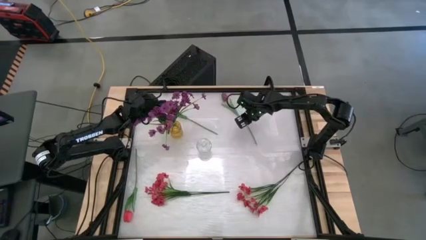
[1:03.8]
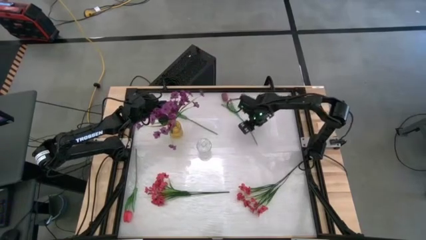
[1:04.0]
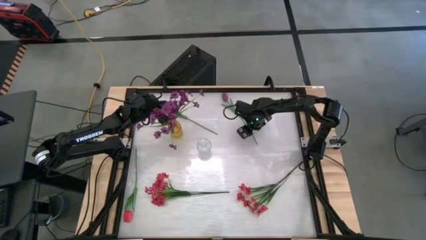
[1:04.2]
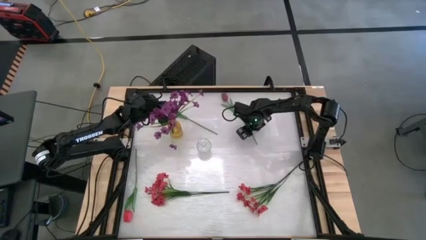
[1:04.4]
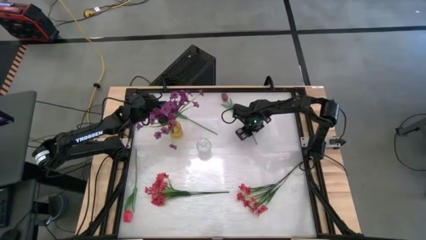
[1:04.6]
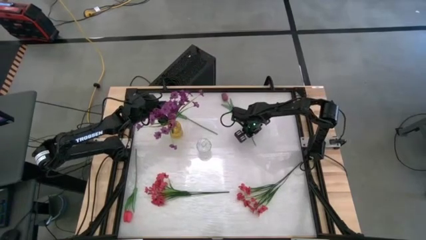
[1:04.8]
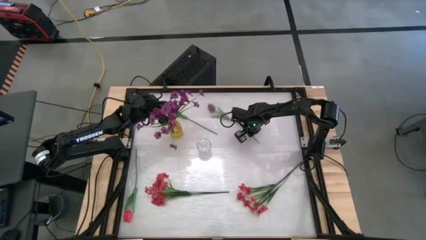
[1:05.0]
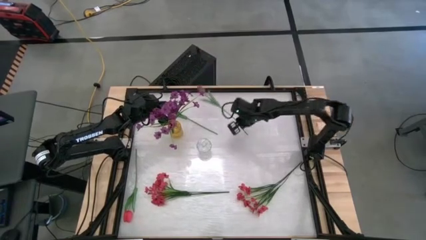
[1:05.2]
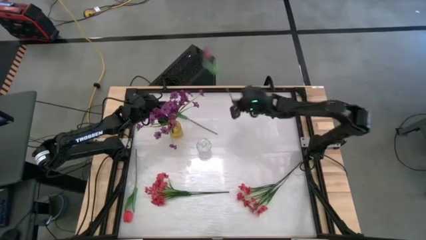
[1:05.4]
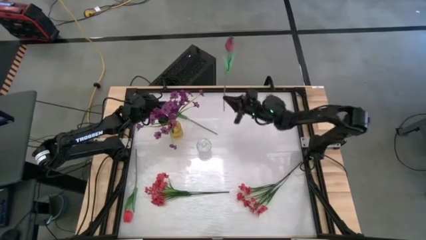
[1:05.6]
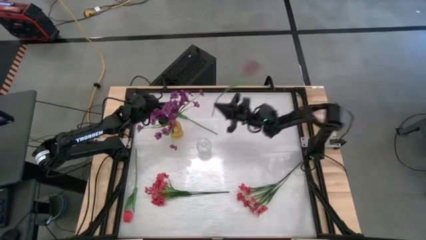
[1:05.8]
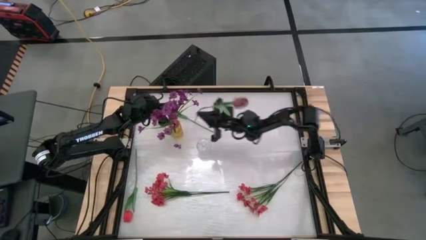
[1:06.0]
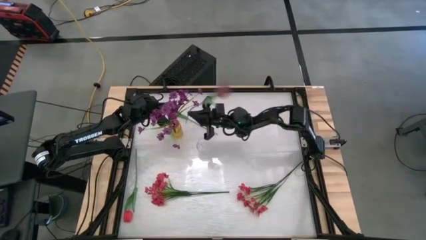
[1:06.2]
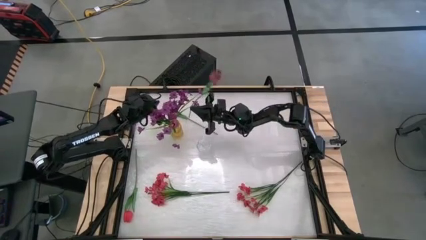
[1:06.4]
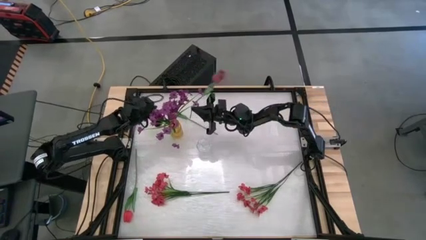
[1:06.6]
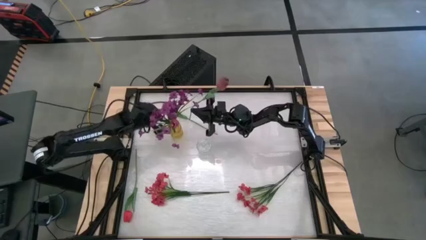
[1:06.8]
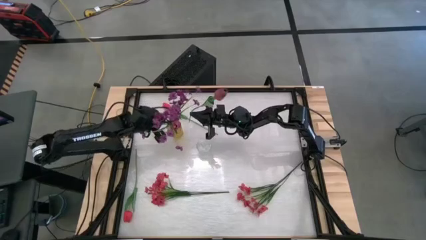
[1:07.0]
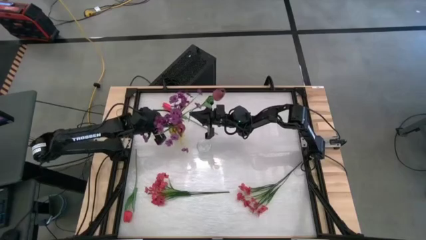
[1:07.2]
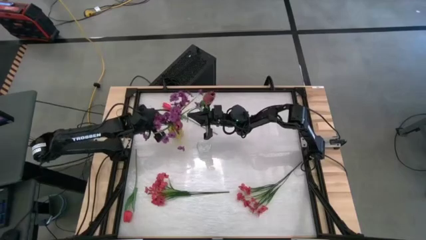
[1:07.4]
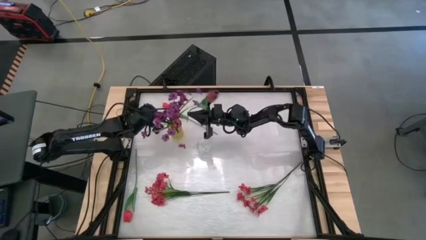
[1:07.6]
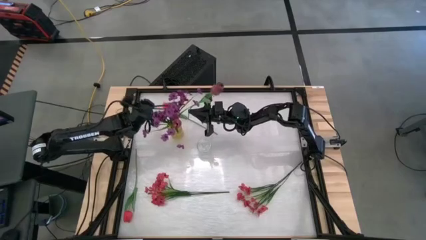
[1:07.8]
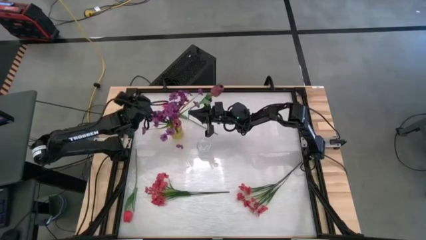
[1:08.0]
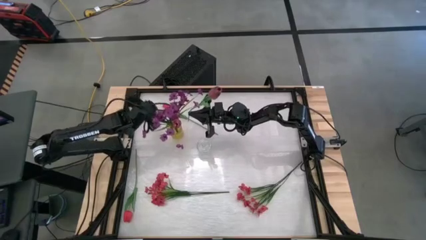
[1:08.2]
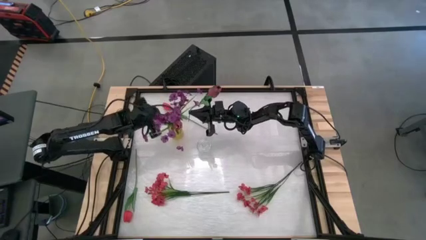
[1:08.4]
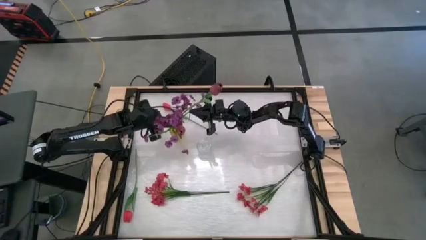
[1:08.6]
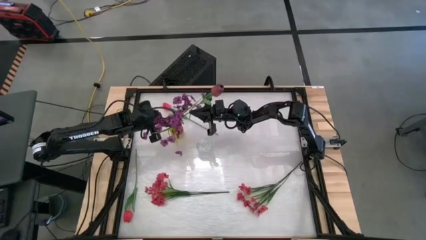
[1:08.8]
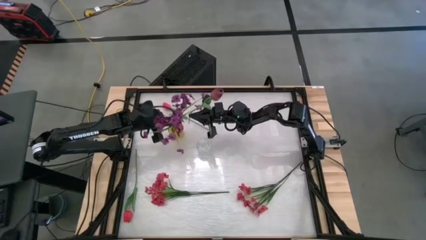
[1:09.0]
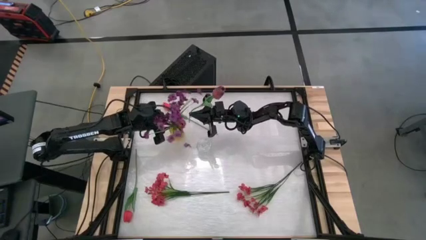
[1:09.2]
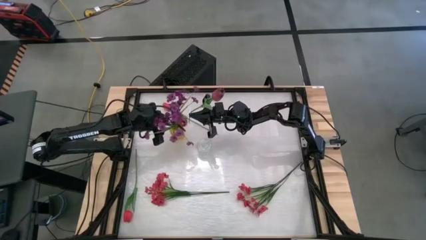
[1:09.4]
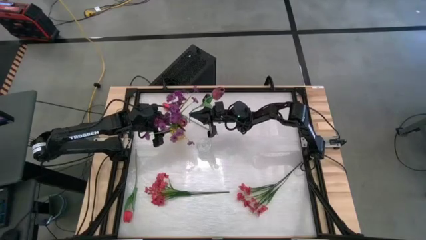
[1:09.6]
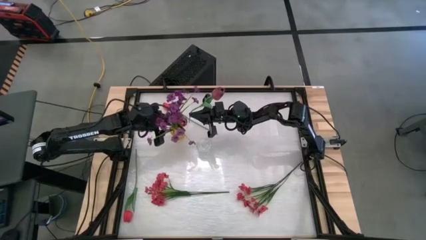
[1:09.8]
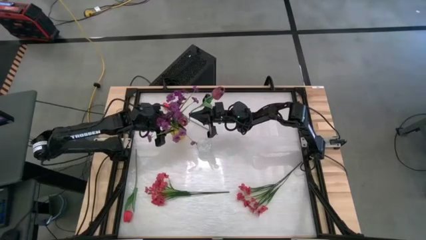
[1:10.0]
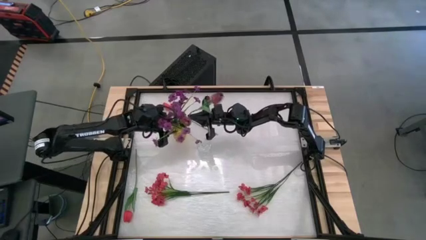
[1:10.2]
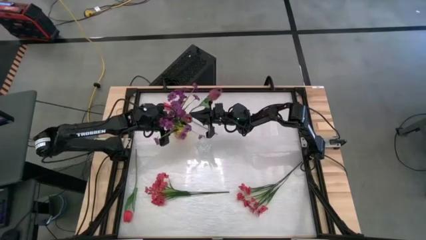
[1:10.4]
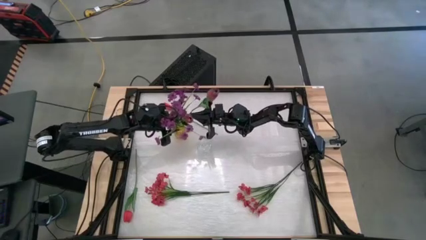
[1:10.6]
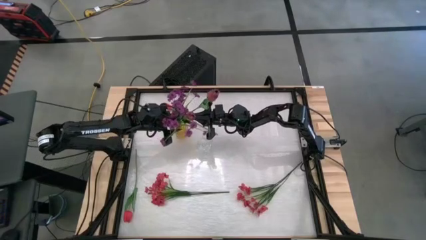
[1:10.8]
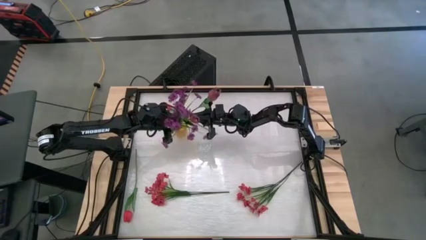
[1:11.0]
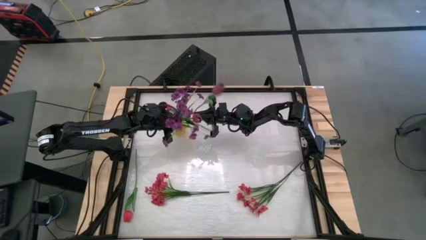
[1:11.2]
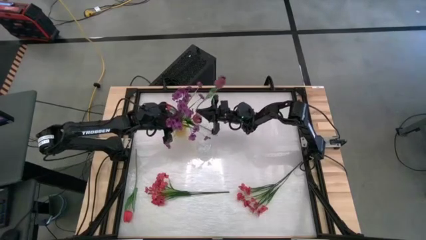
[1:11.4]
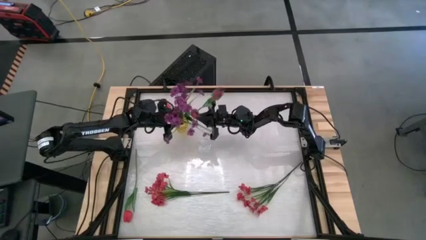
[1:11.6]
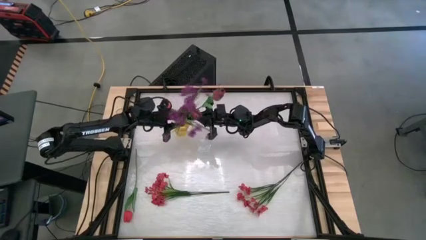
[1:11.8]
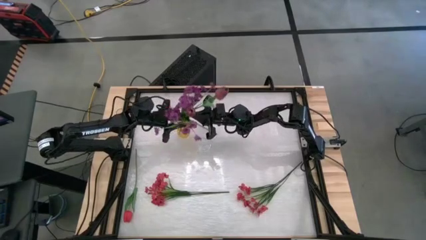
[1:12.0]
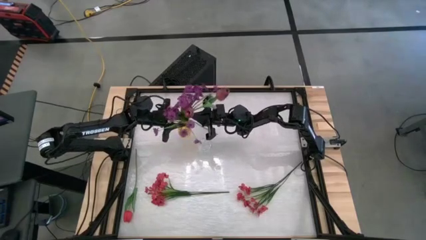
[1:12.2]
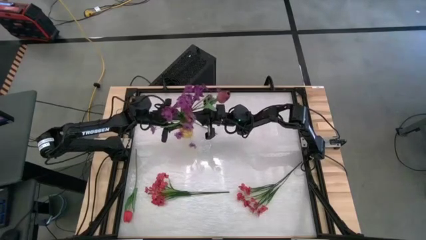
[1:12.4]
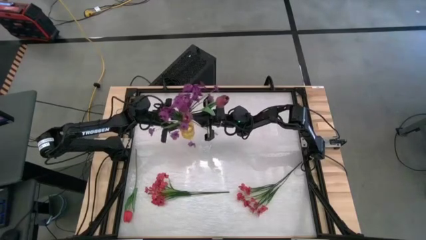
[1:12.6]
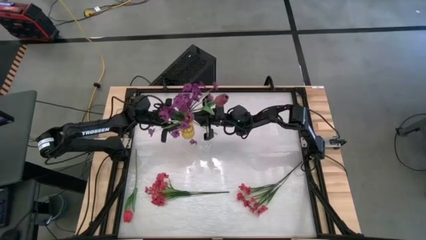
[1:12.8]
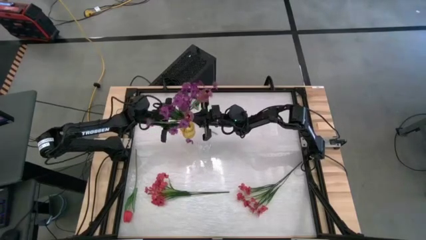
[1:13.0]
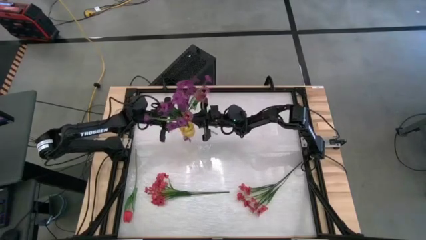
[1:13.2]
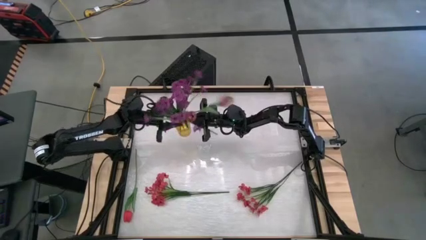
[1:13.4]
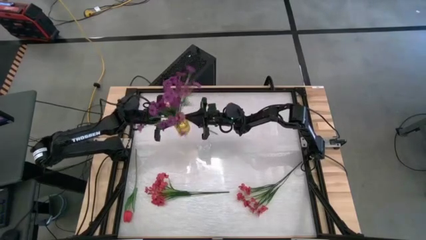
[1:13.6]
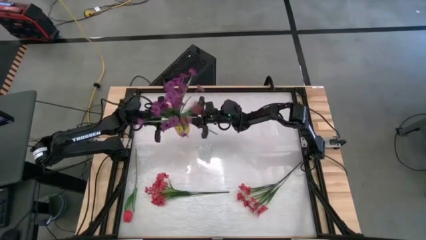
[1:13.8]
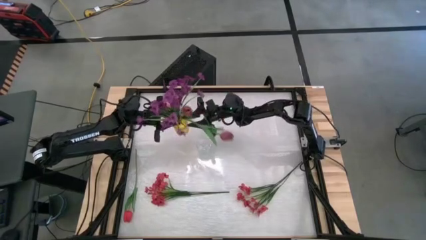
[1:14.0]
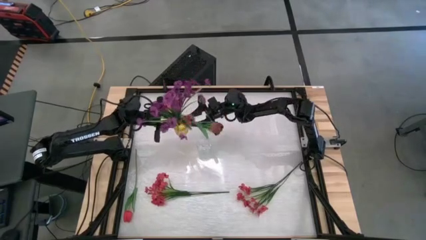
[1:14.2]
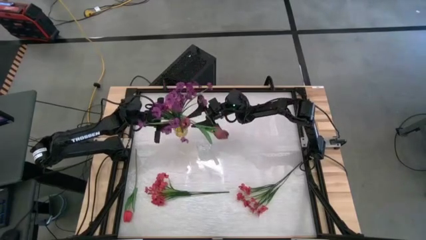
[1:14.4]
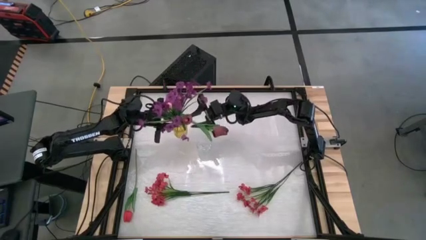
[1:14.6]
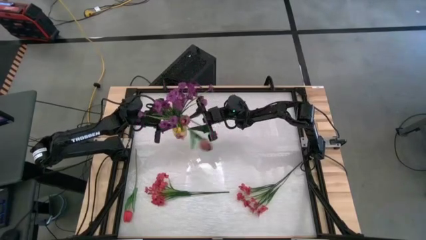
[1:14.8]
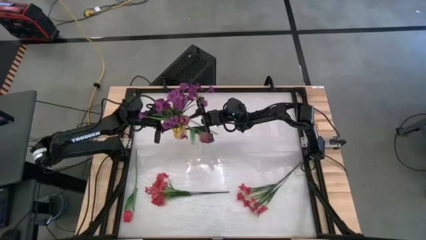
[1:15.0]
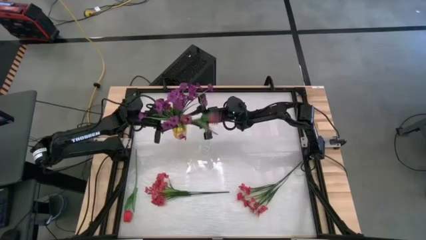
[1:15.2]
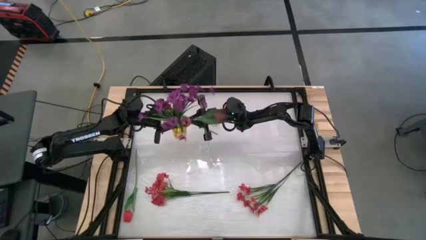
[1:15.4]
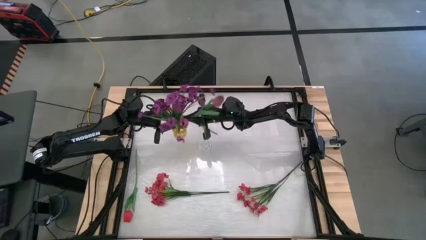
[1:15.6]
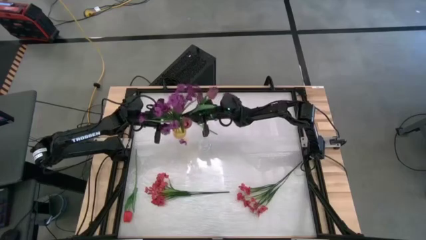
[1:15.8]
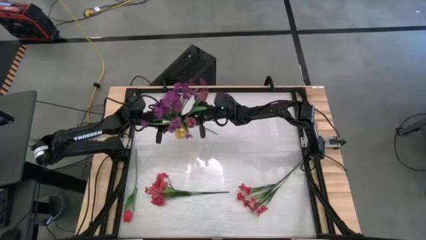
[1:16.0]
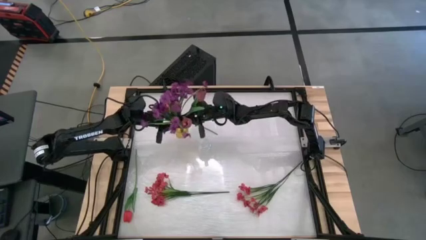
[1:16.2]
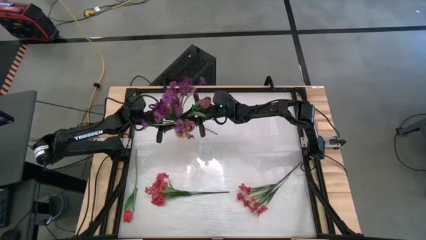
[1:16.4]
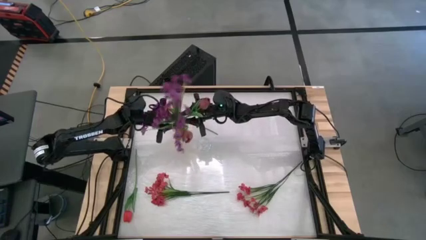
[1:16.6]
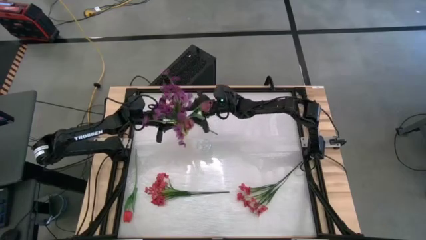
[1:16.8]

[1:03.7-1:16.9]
Task: Sort flowers into vase by color
Put the red flower into the yellow vase

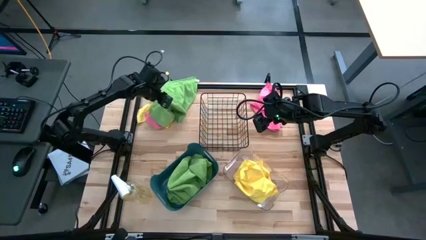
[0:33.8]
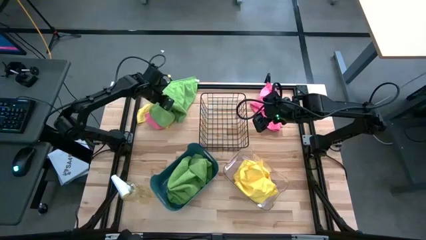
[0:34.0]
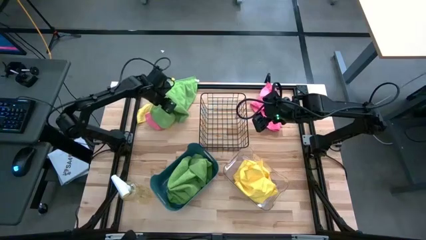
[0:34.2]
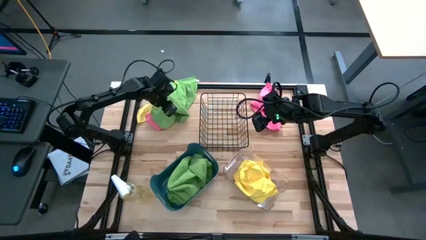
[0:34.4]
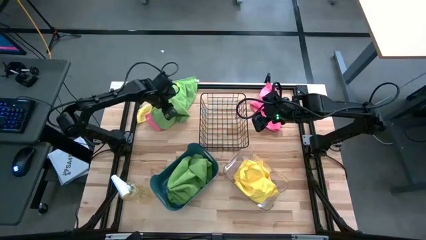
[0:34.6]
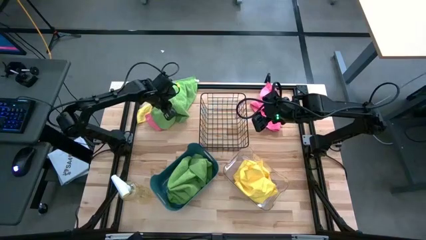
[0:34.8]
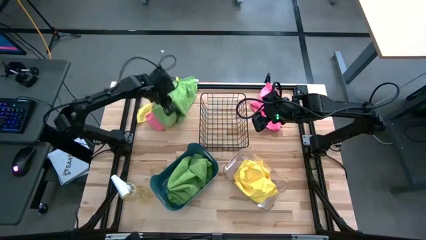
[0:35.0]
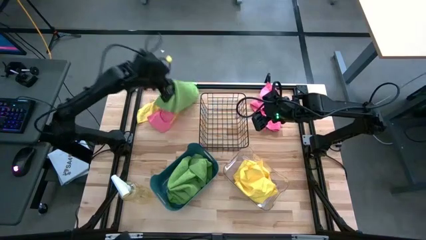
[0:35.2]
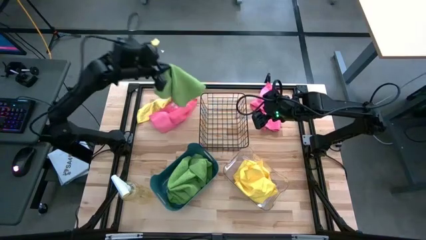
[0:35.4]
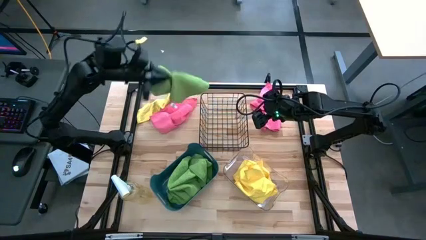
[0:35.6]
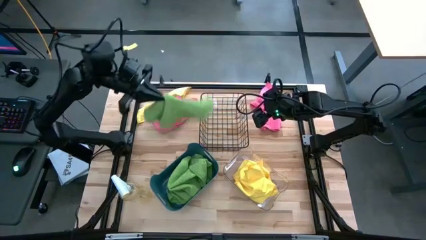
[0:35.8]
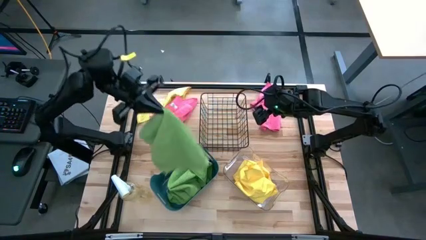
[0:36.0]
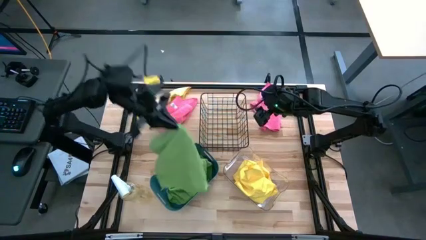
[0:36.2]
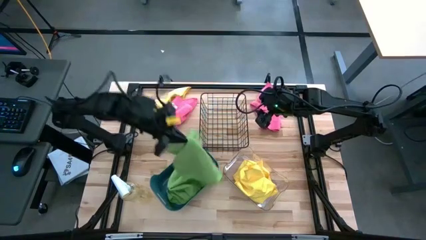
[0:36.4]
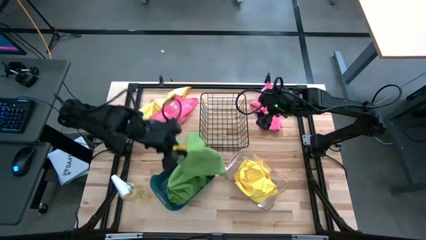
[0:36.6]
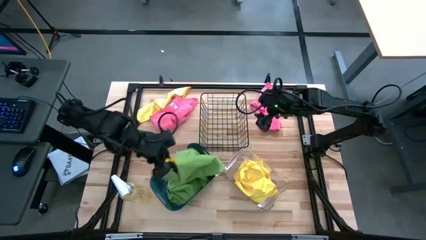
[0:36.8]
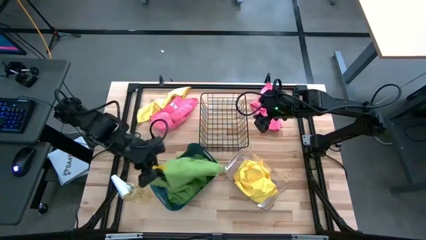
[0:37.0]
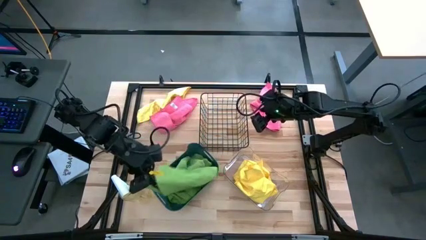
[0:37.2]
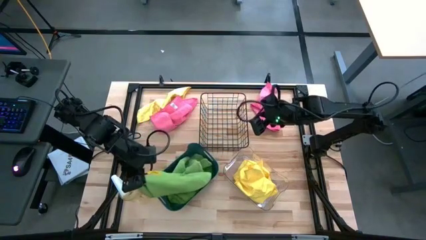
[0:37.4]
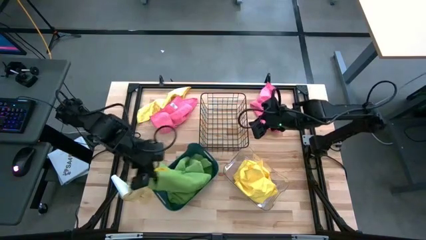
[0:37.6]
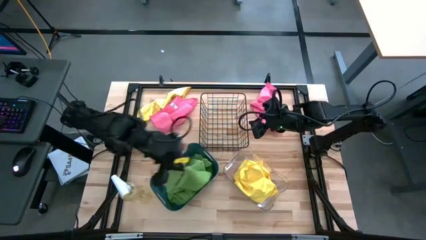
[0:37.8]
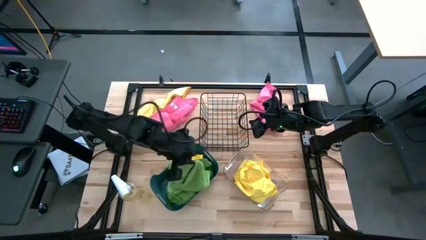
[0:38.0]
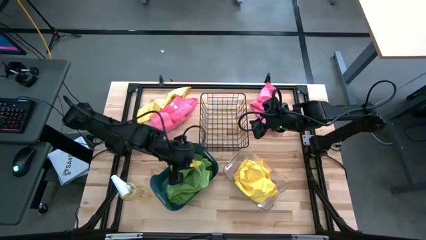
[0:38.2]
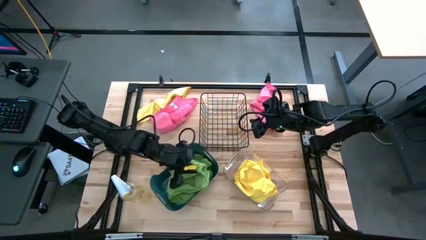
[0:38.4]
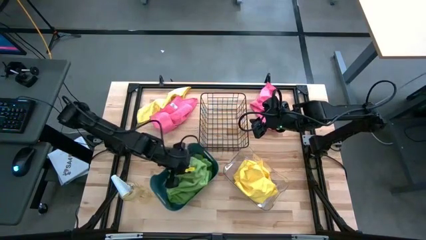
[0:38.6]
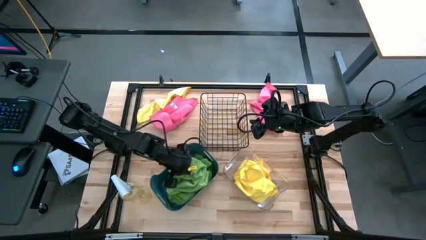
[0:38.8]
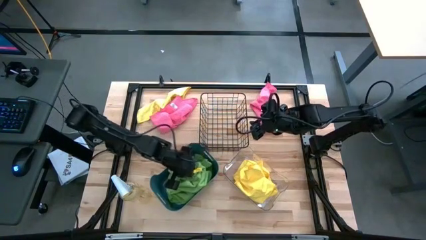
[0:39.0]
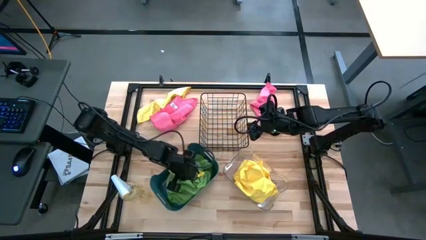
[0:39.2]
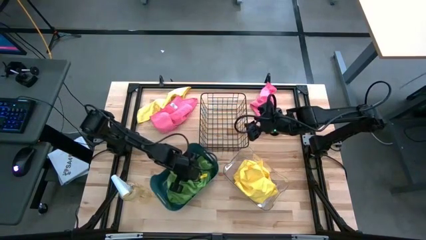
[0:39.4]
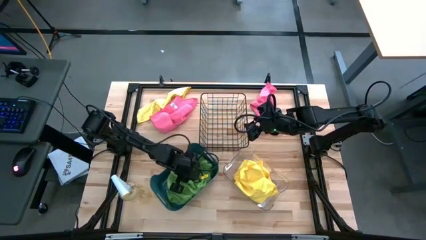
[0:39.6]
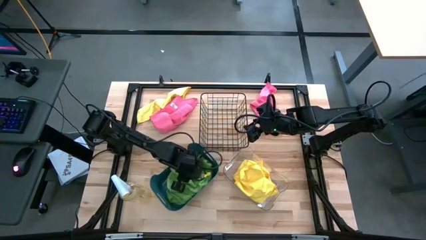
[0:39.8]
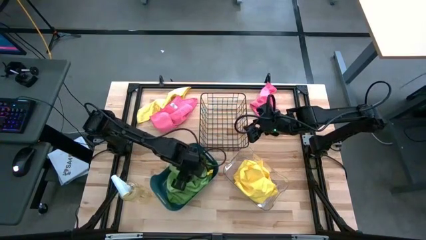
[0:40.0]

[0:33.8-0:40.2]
Task: Sort microfiber towel by color & place in baskets
Put the green towel into the blue bin
